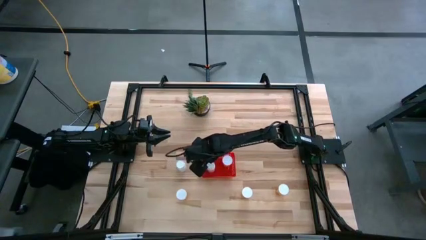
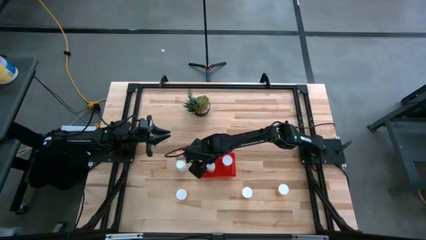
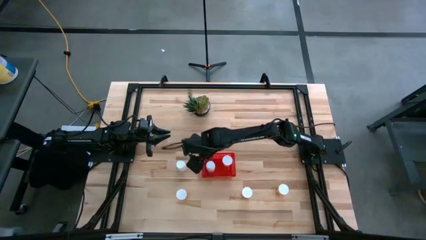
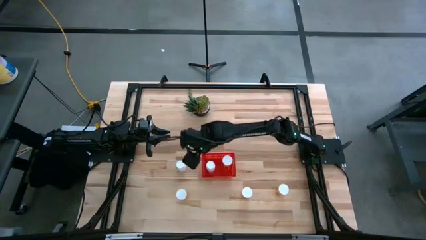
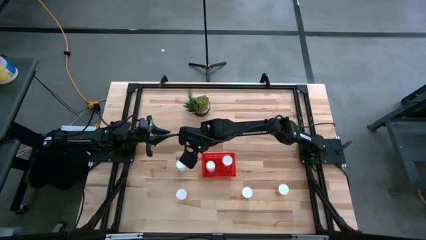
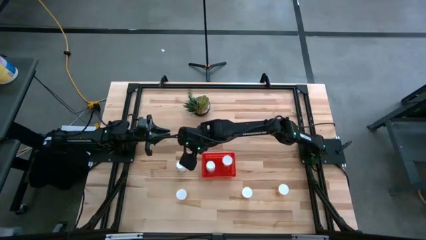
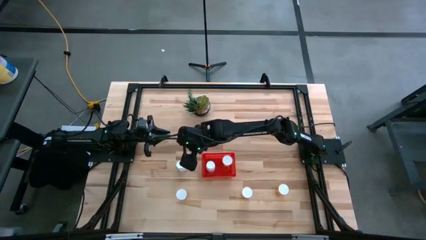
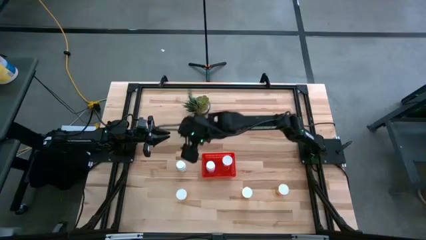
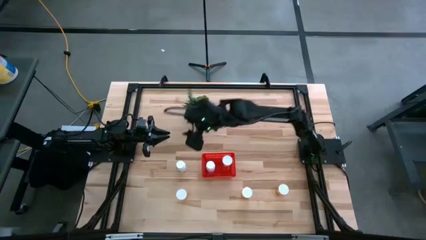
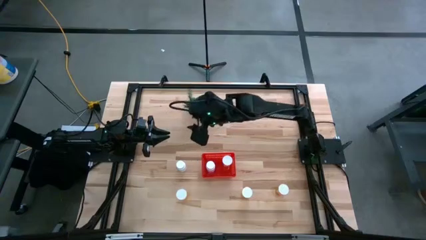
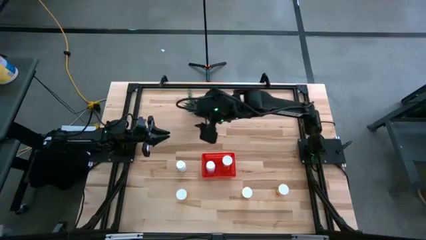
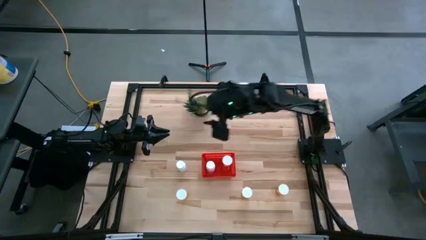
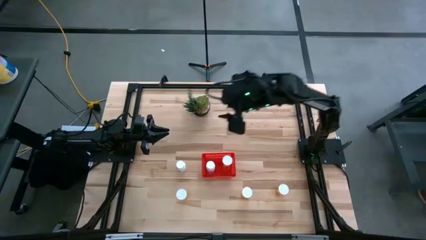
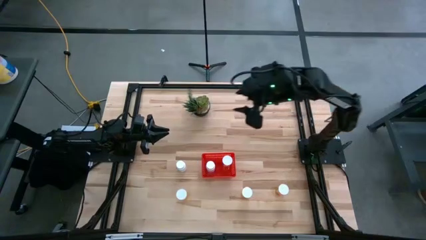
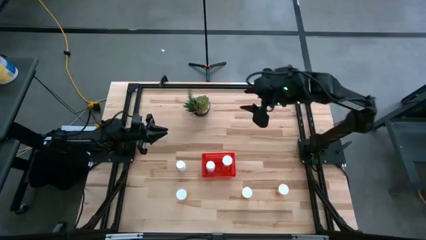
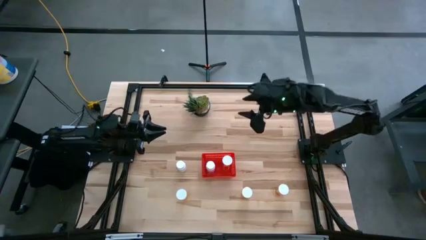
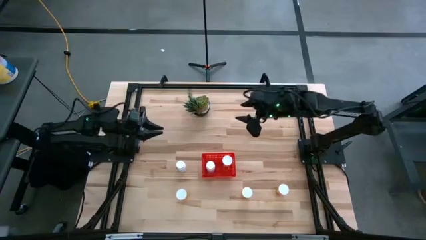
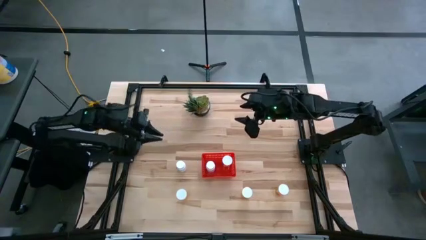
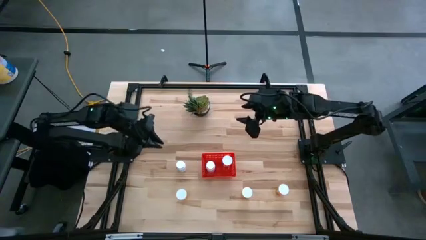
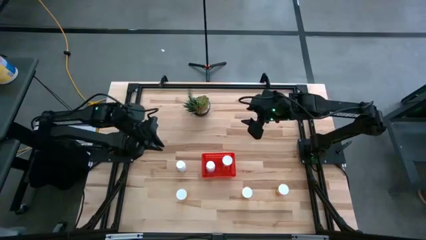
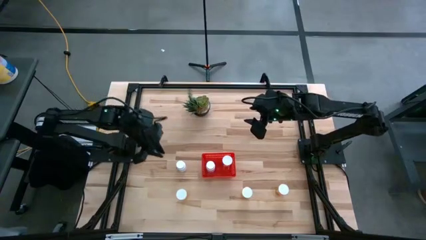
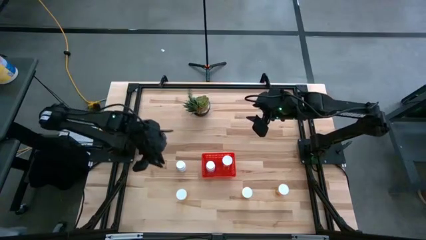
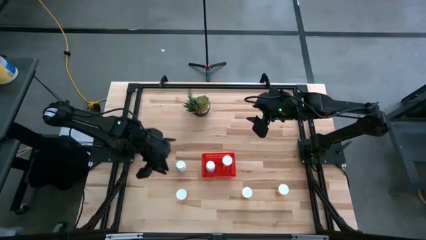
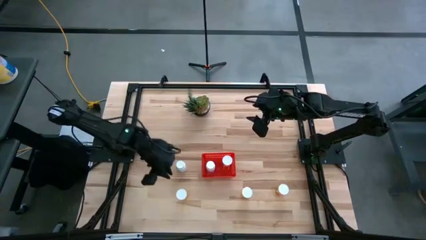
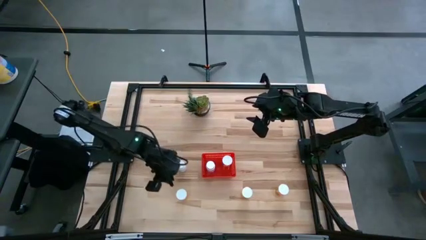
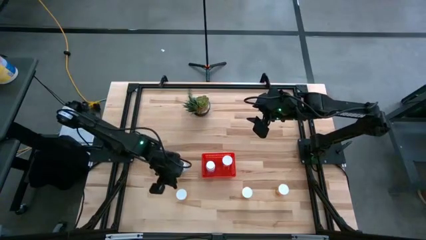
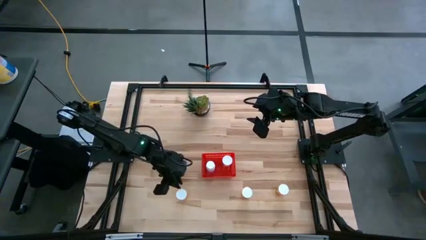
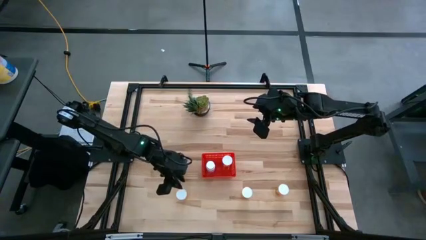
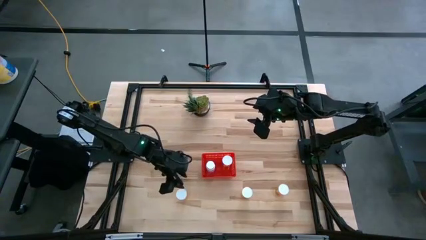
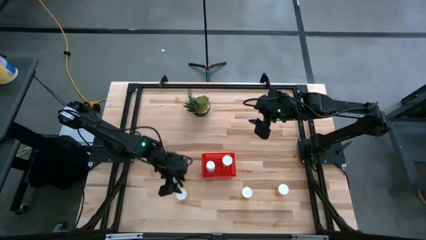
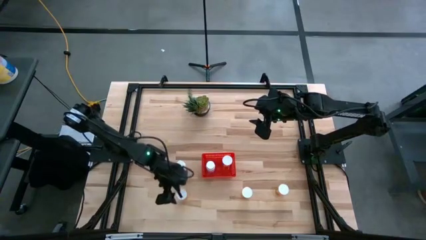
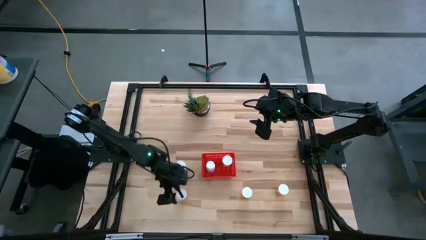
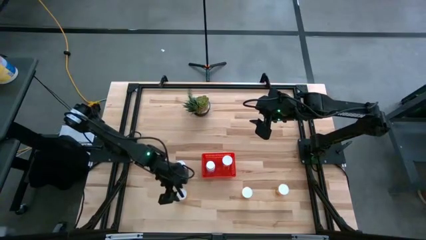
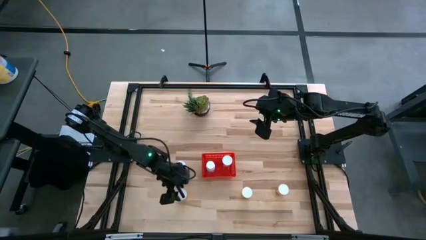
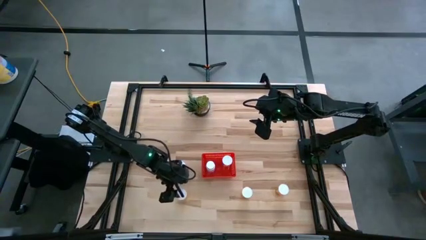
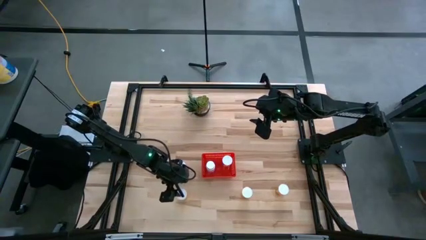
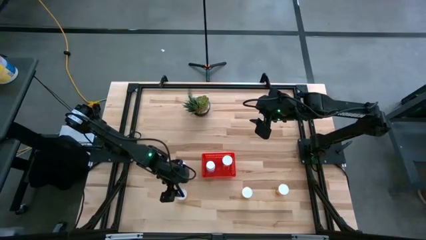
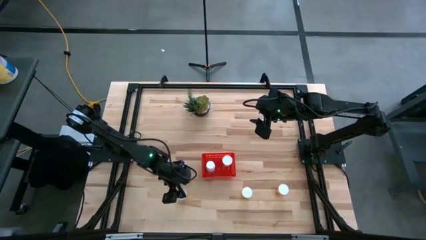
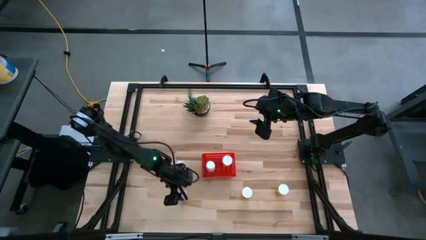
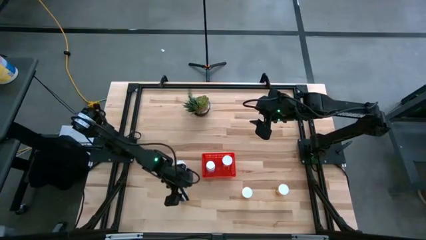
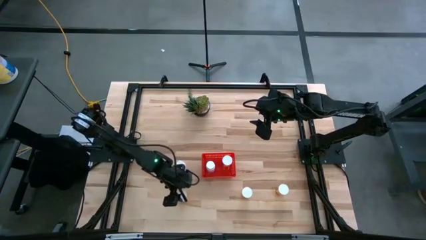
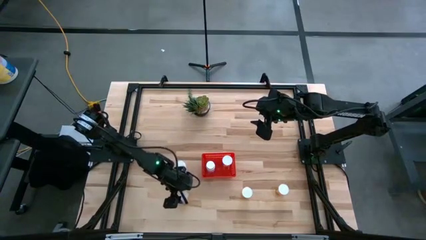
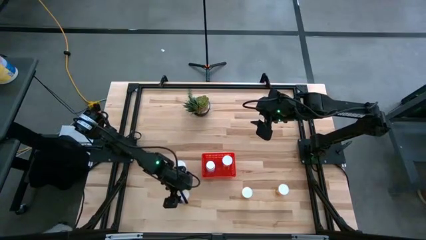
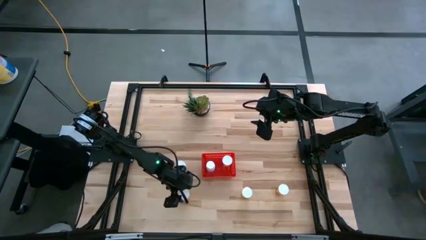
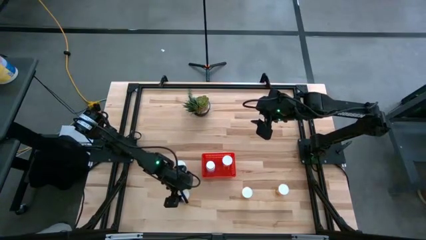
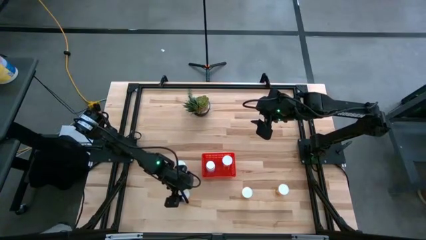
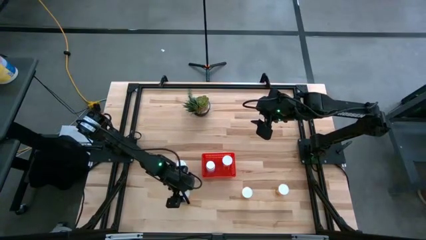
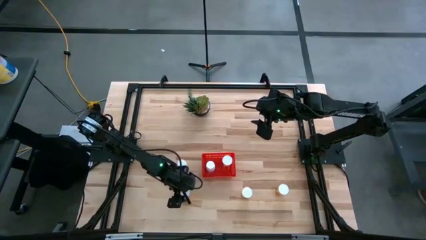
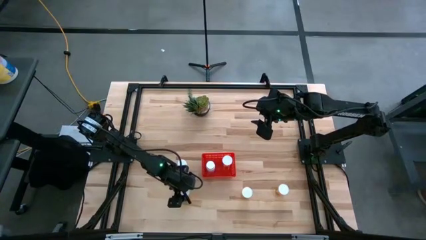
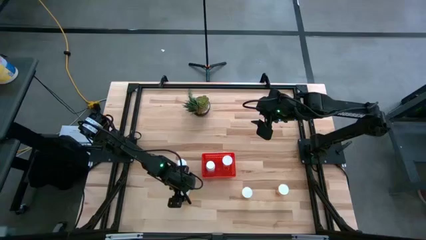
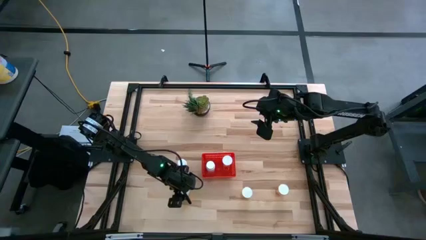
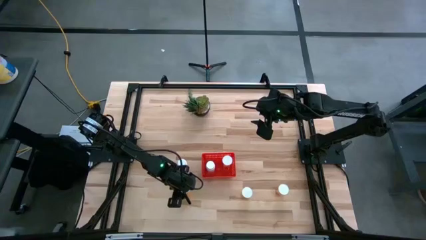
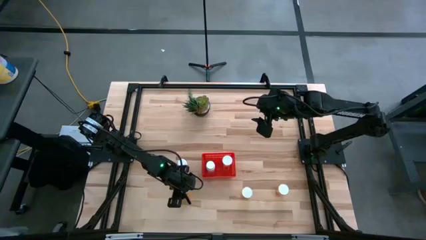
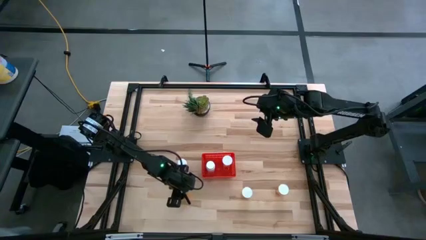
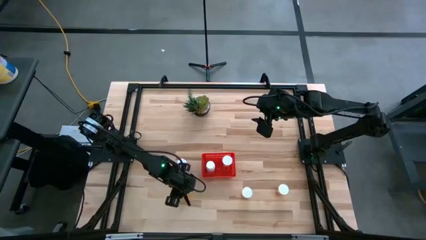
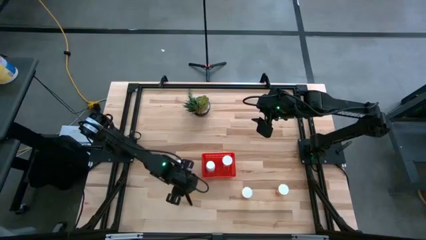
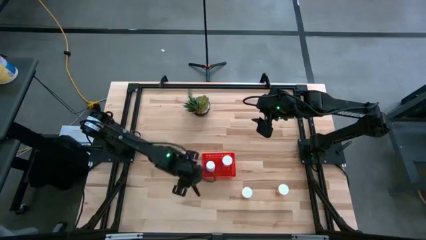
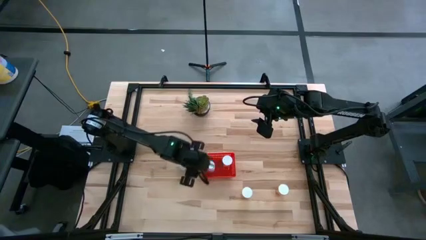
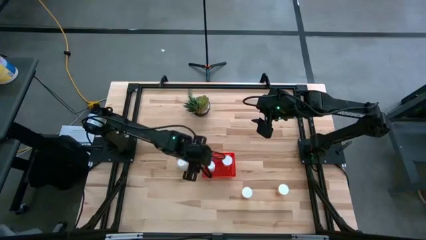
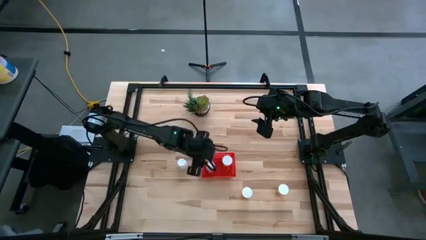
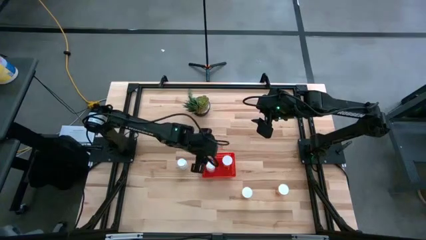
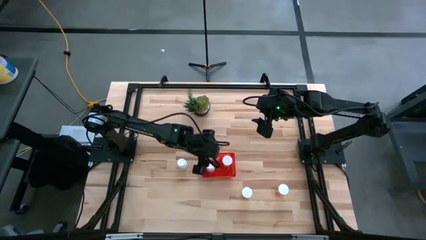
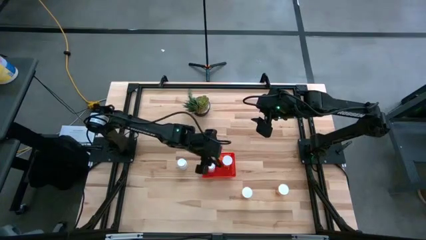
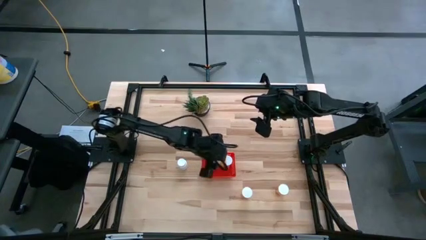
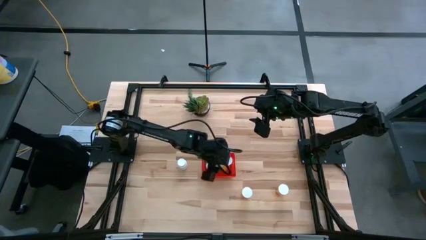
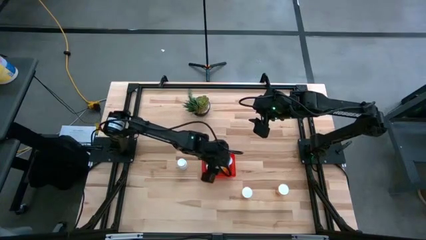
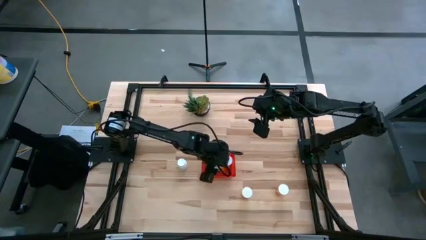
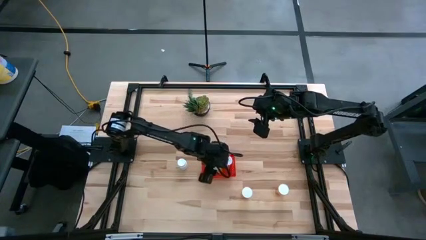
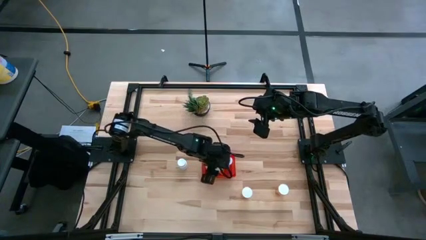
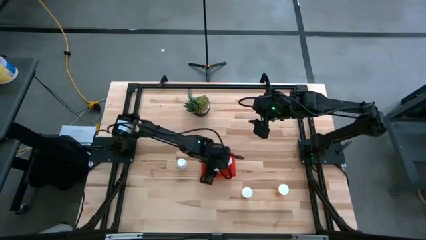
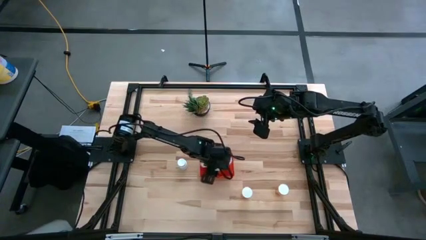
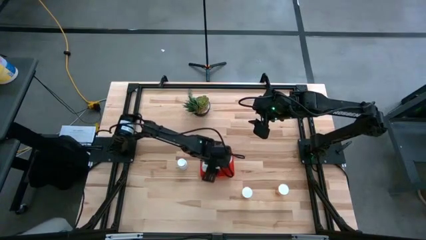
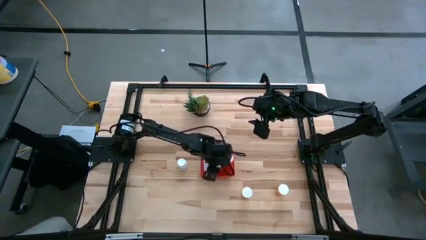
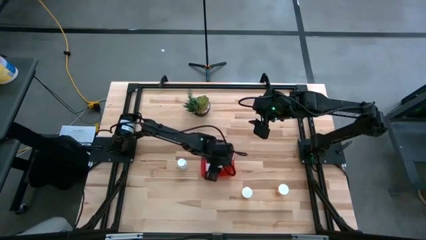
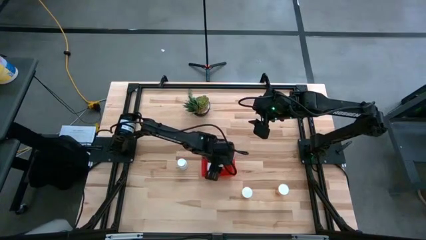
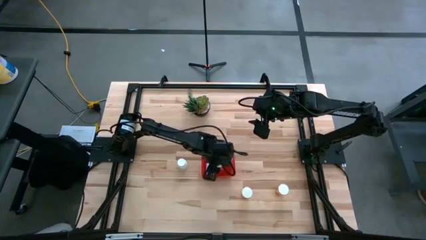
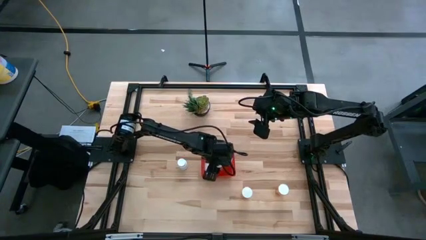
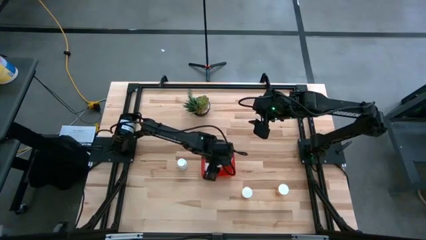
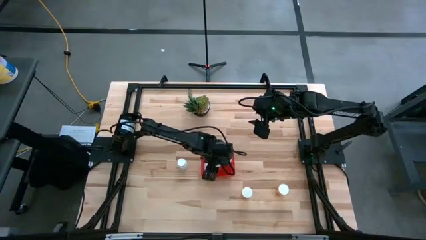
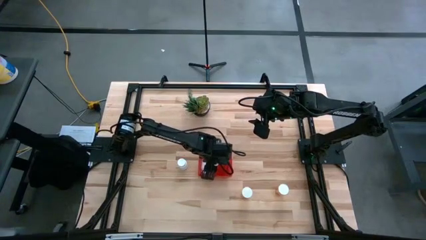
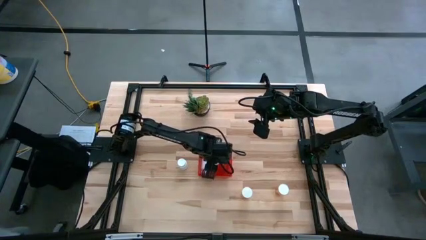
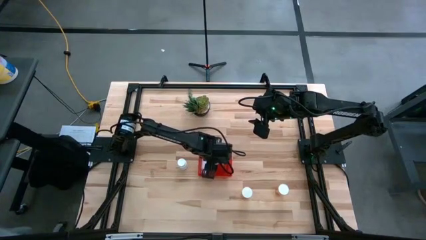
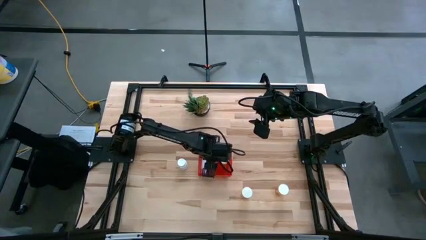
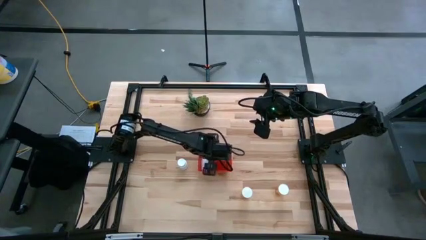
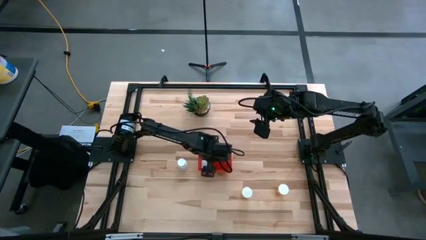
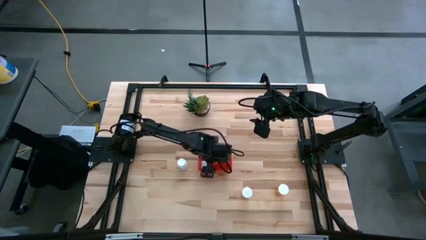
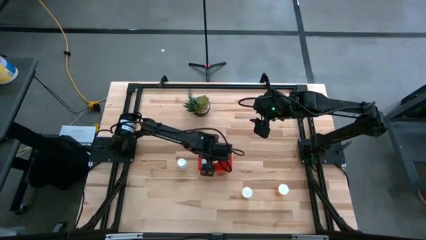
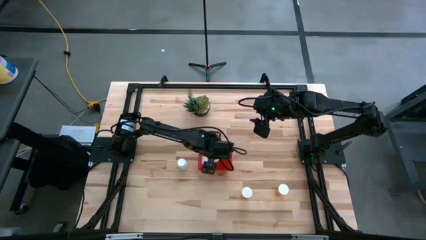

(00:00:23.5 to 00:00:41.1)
Task: Pick and place pill bottles into a basket
Put the orange pill bottle into the red bin
